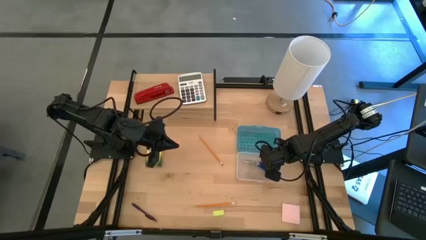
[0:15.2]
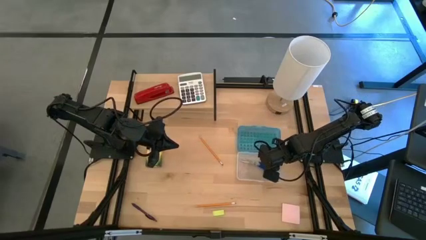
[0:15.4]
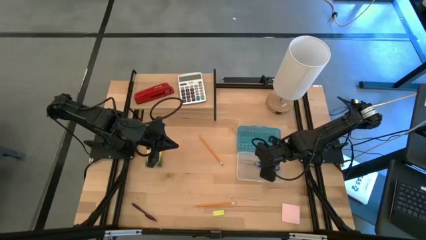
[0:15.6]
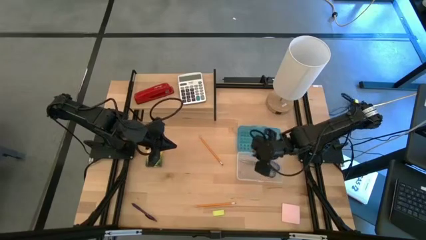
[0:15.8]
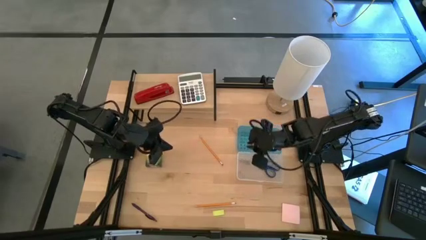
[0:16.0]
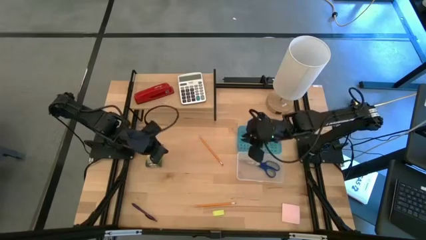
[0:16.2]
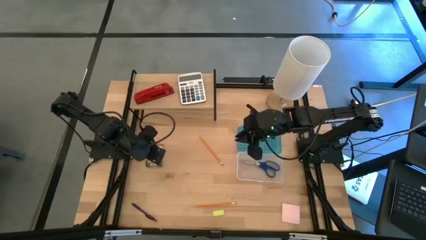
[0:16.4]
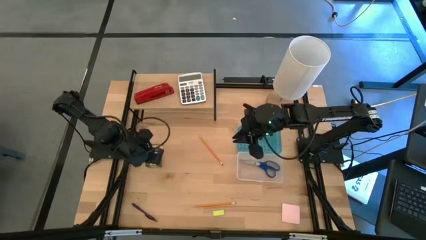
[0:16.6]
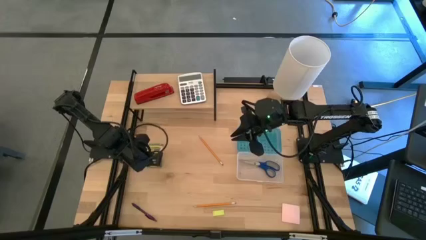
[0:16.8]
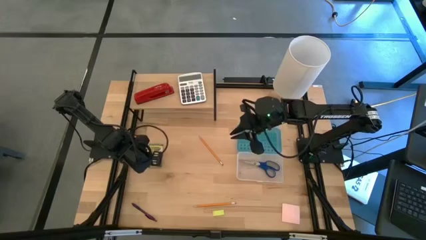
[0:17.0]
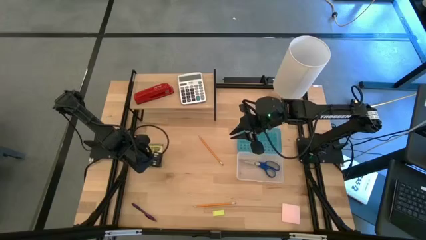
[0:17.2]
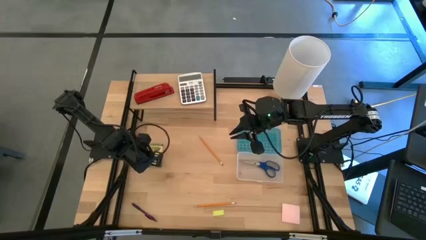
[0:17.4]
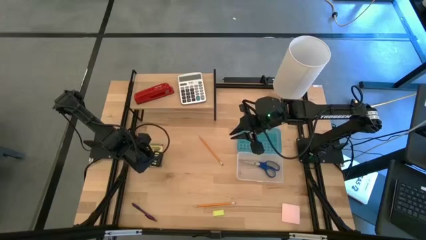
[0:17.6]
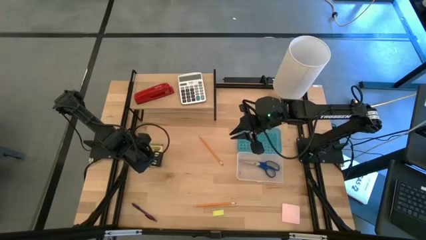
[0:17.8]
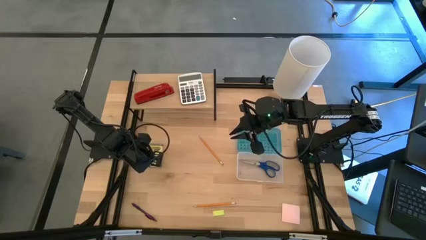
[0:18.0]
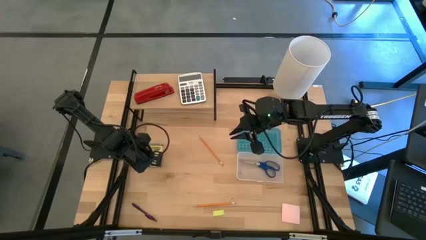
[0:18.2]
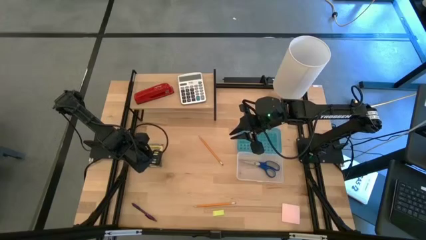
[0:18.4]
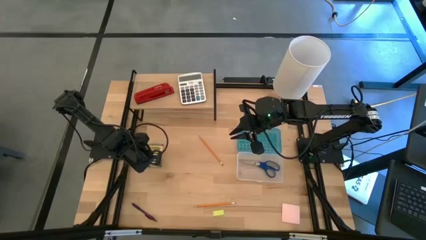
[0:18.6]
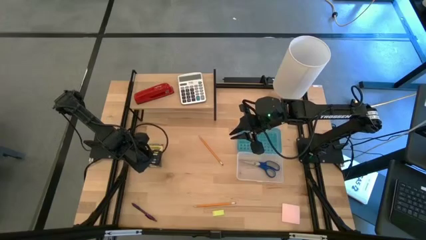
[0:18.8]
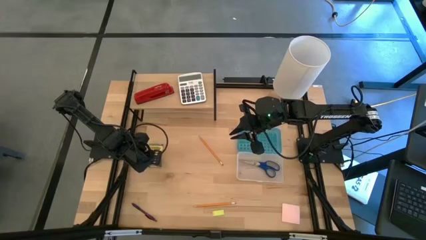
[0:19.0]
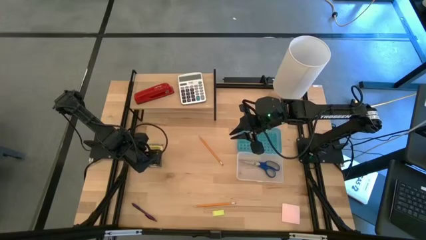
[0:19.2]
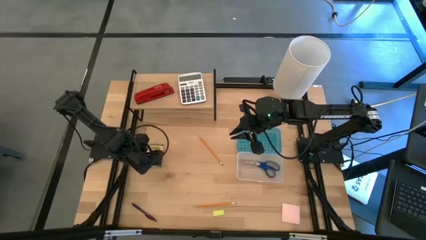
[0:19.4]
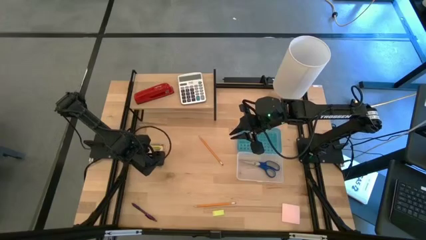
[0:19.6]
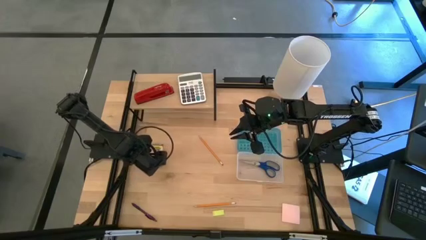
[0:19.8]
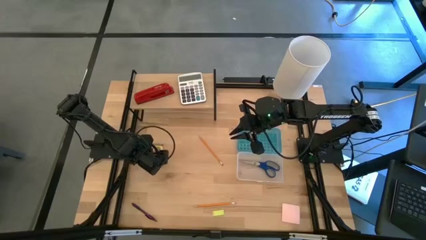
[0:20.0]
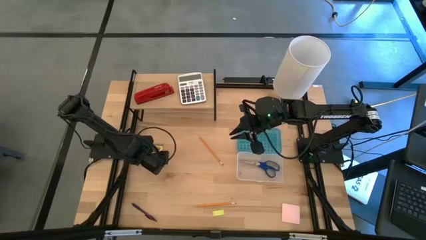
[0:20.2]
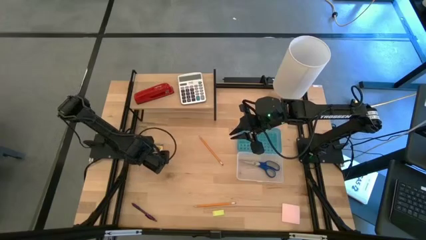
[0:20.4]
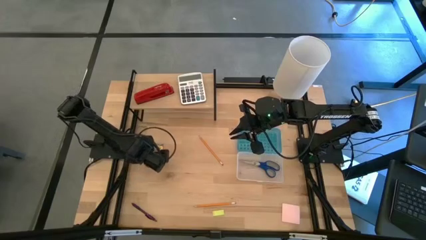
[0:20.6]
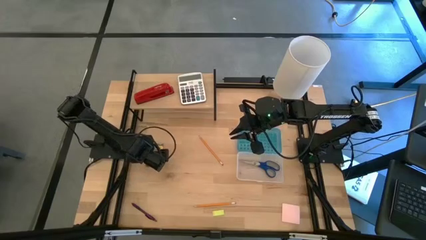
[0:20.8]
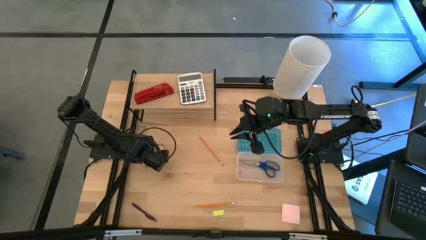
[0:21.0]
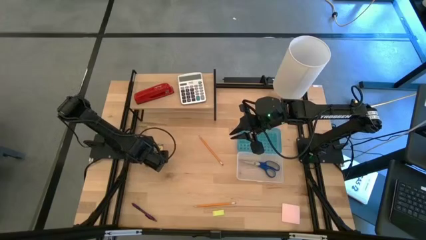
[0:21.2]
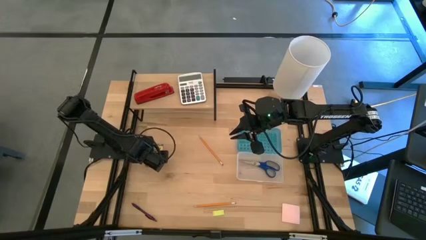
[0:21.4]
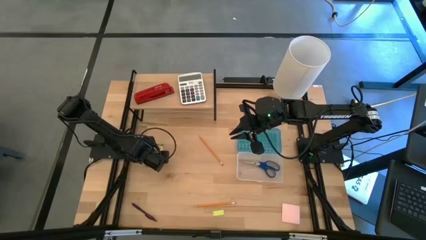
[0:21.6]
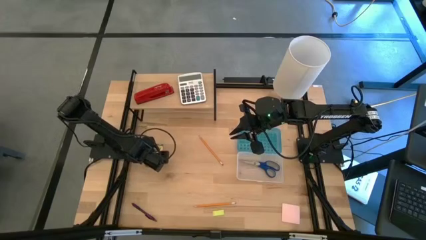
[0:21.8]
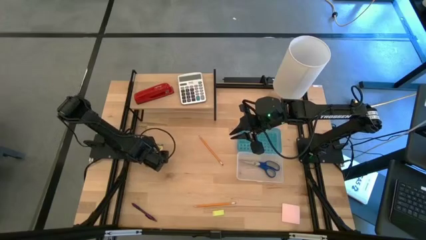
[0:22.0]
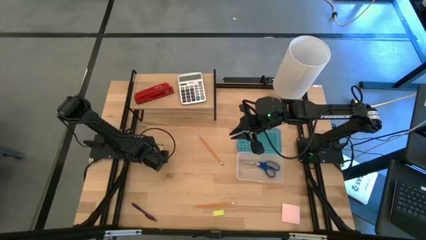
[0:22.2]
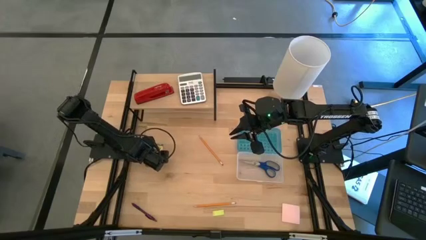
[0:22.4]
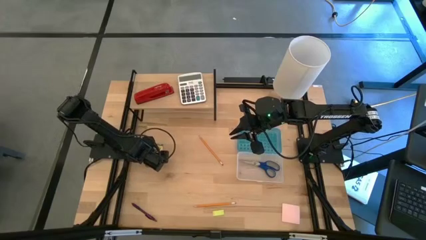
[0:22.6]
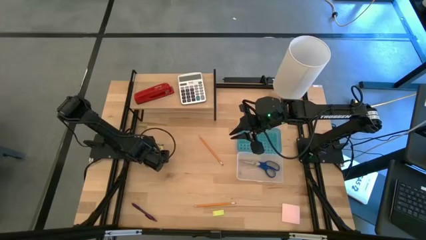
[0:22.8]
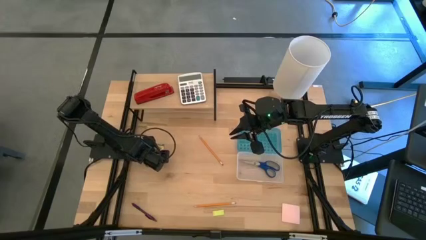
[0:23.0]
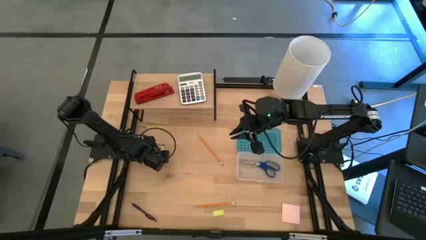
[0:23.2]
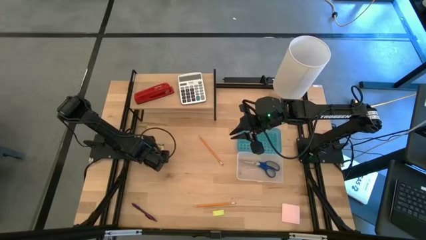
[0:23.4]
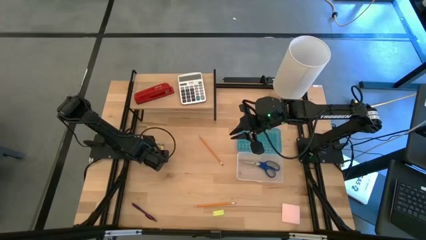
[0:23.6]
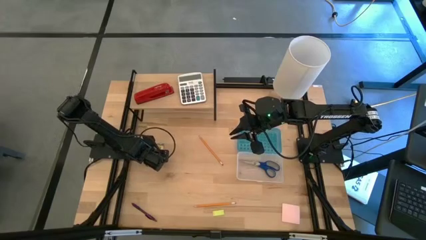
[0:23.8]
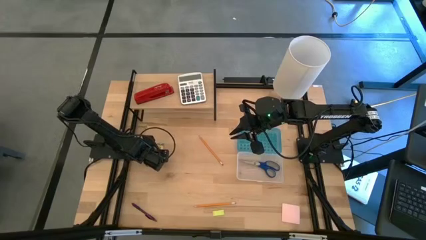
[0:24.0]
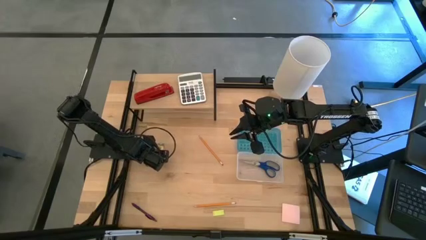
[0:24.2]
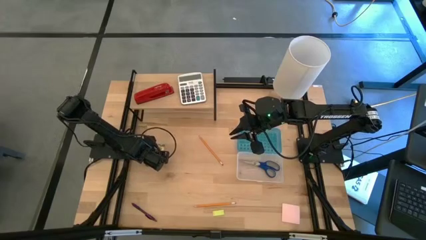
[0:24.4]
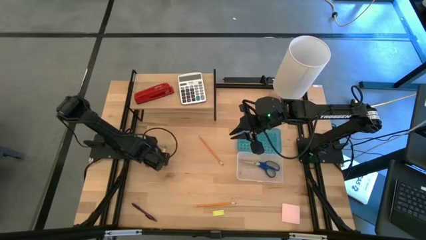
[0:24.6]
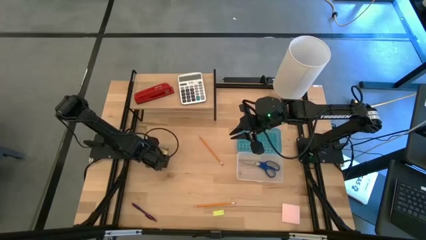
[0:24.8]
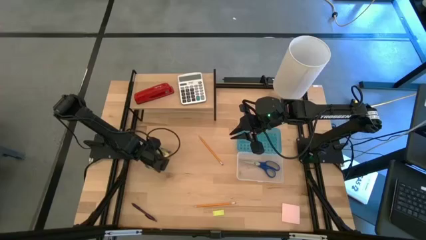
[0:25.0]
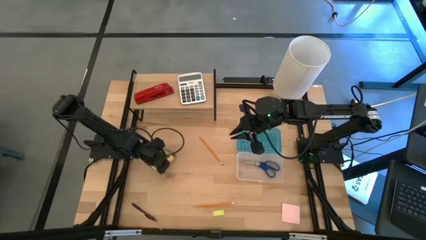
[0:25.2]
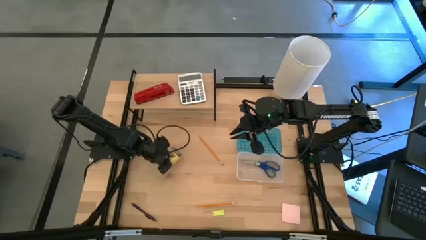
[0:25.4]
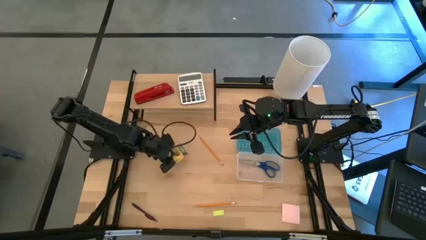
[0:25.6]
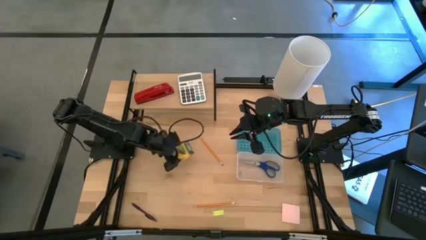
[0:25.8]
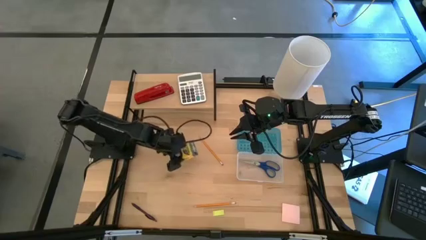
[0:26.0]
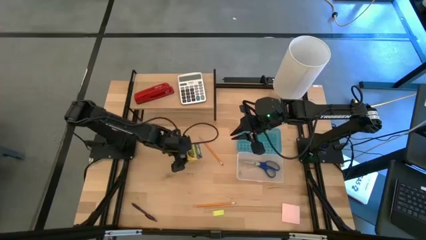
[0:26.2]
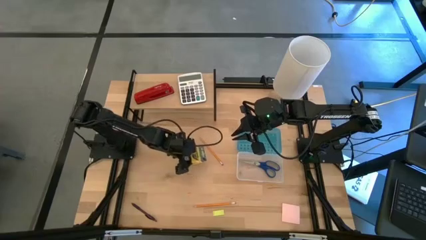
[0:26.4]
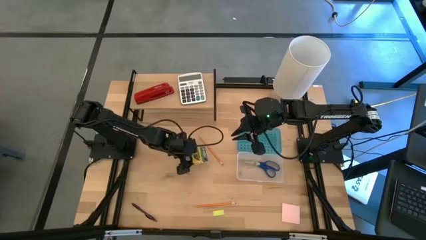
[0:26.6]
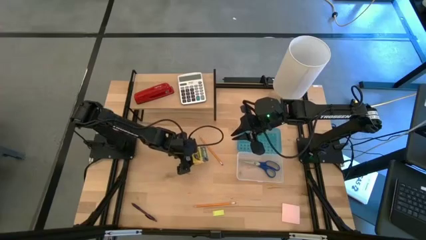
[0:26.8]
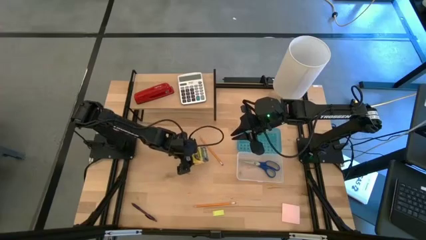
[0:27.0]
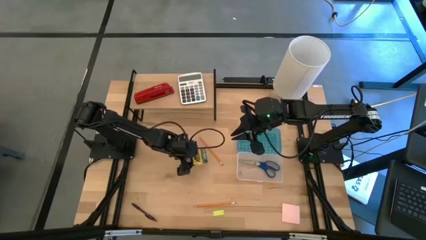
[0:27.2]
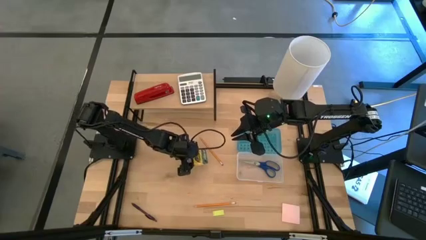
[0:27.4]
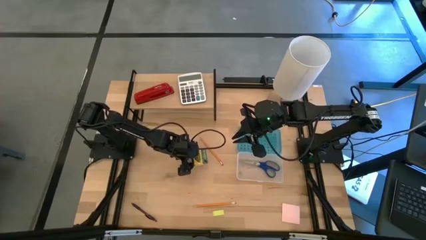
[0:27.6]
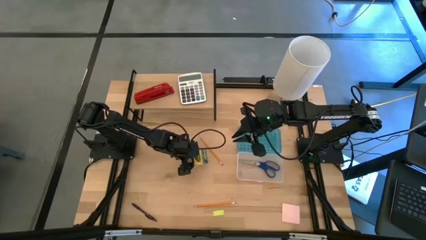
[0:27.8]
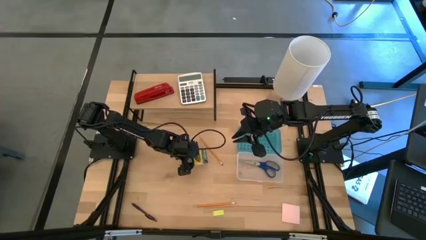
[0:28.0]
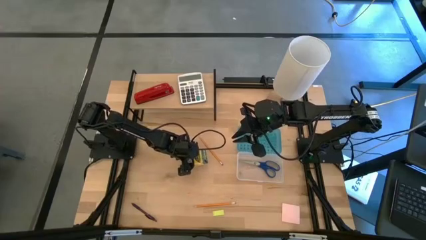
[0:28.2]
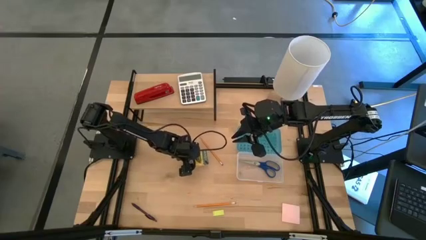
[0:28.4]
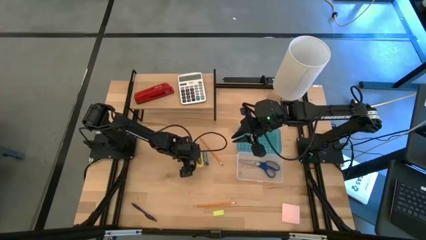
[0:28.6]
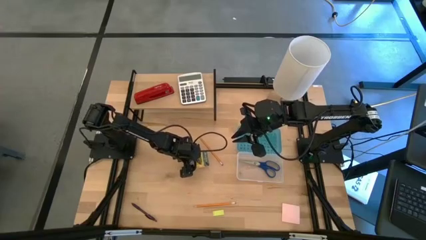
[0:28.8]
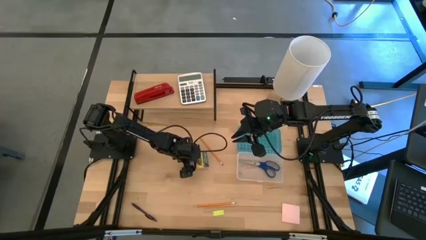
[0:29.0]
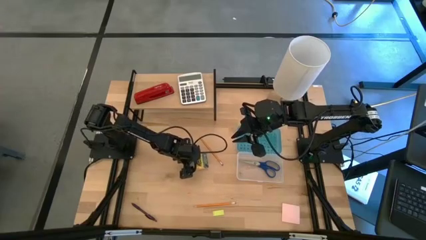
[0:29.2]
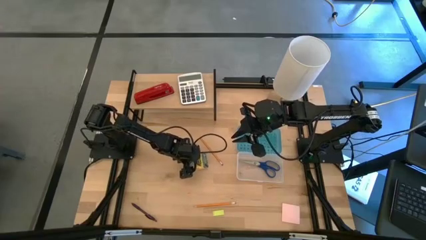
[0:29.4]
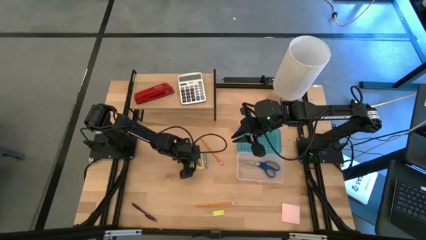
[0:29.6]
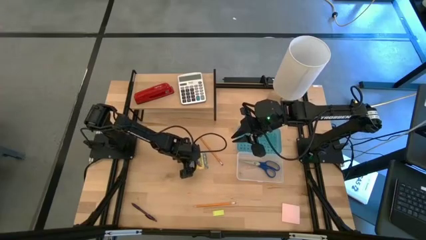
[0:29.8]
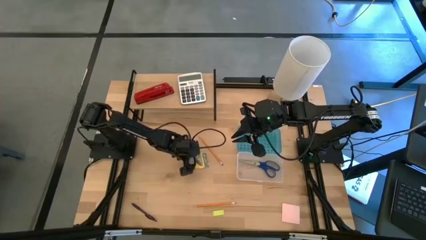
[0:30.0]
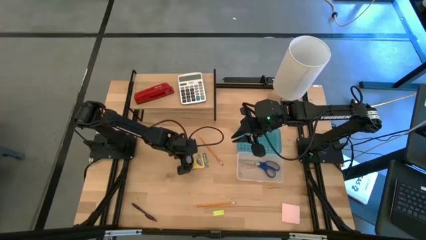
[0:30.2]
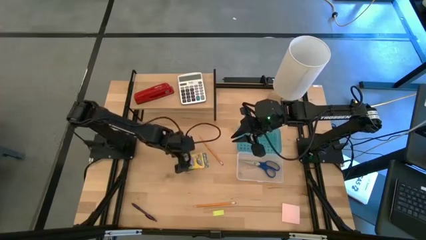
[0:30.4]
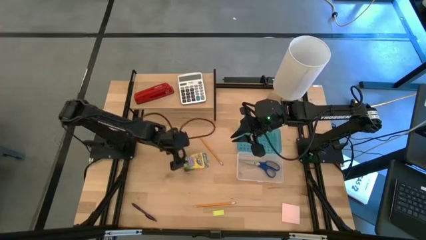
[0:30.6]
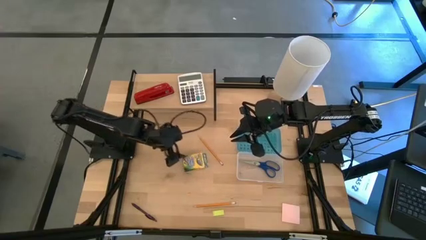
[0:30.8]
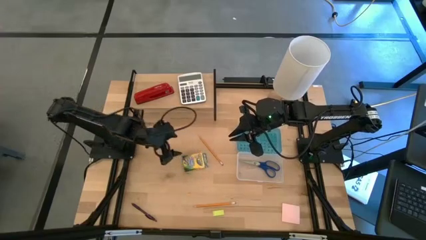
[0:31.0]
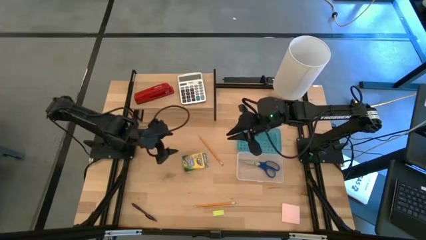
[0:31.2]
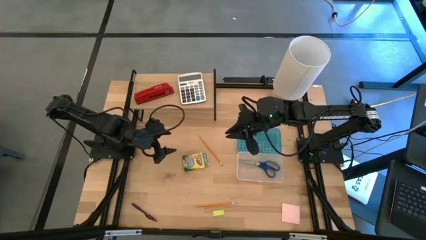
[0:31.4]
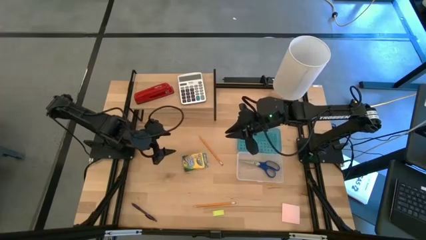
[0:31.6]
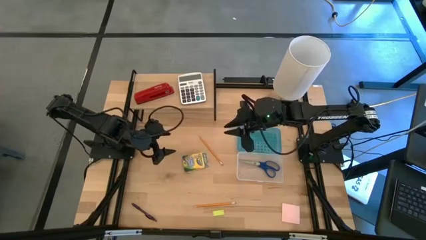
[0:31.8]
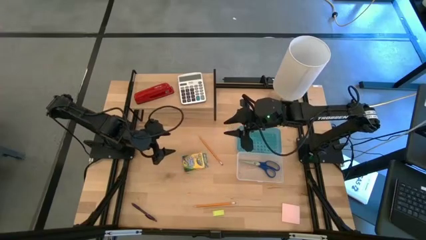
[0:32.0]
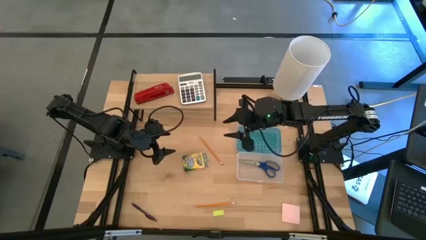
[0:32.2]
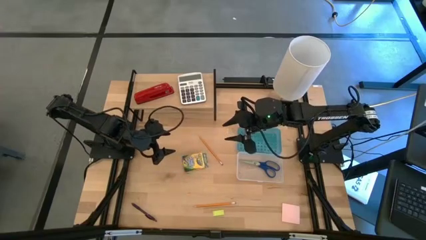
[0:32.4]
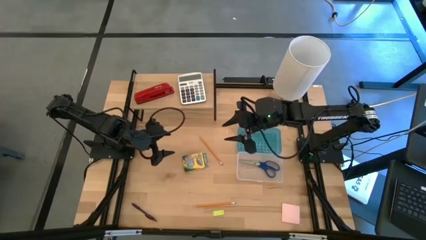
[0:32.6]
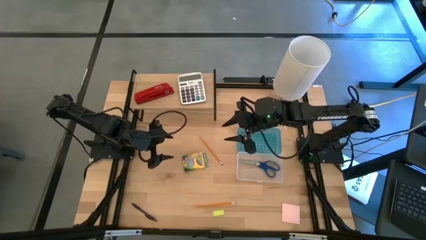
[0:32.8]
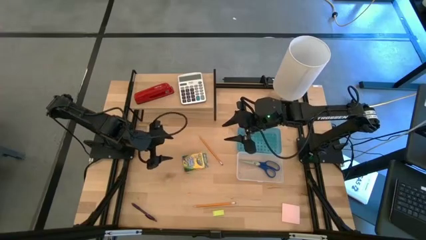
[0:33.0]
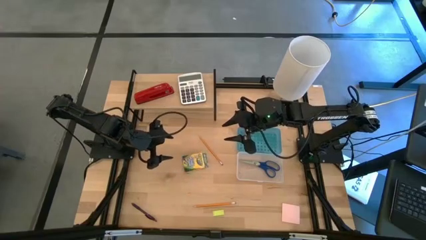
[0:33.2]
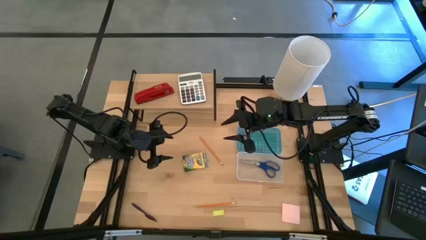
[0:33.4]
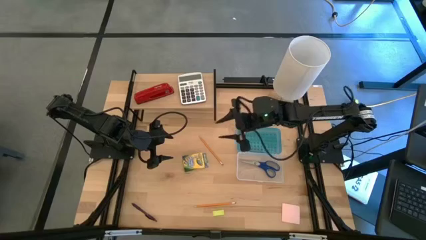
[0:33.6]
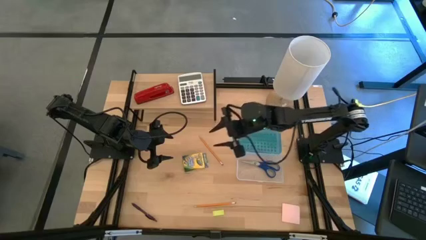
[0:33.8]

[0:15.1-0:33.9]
Task: Pack school essentials
Put the yellow crayon box into the blue supply box
